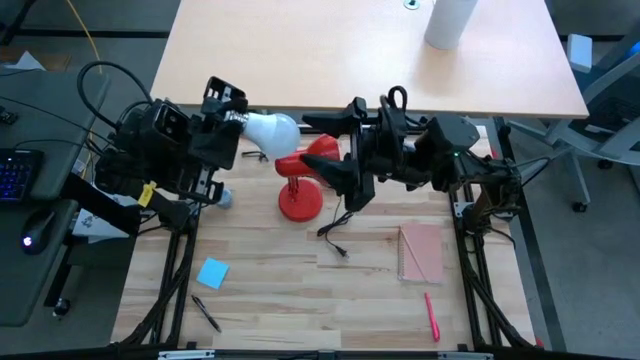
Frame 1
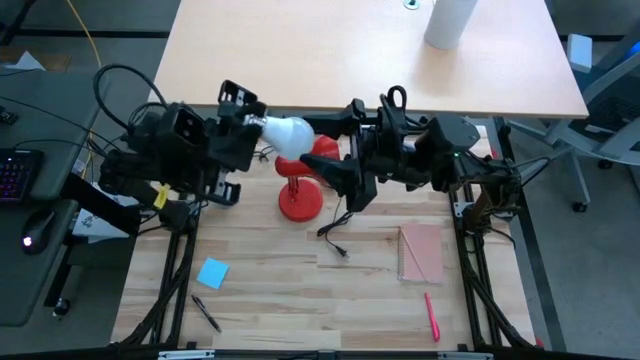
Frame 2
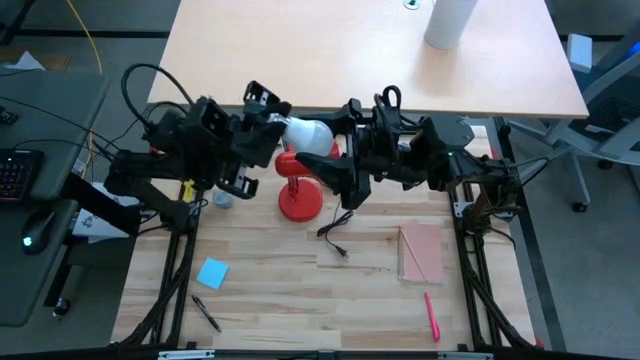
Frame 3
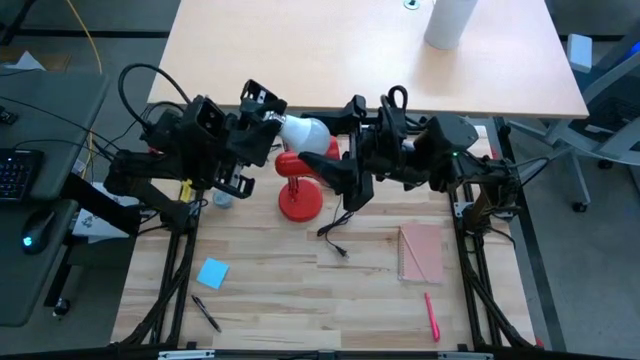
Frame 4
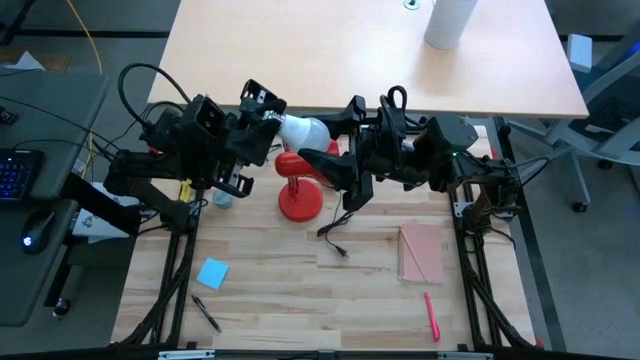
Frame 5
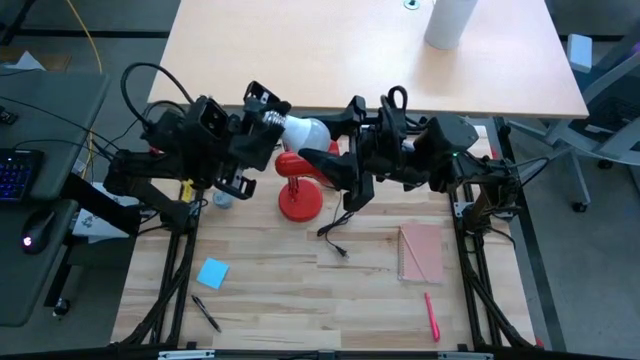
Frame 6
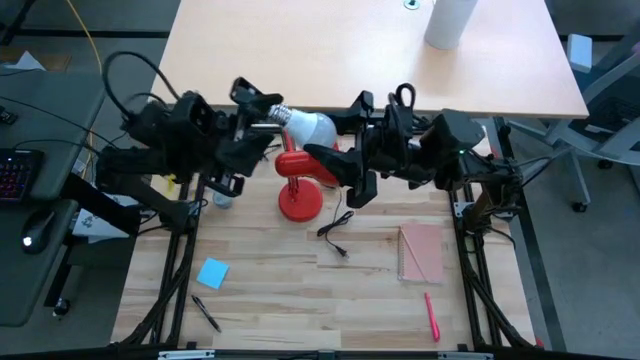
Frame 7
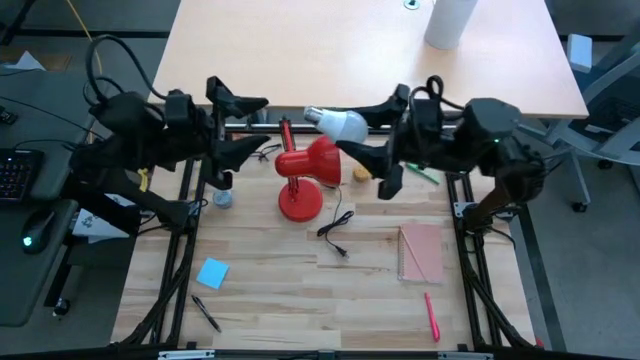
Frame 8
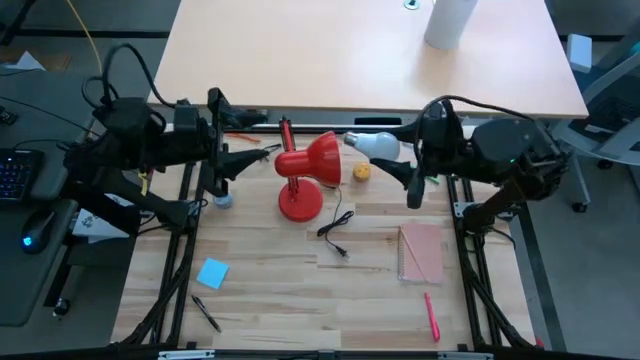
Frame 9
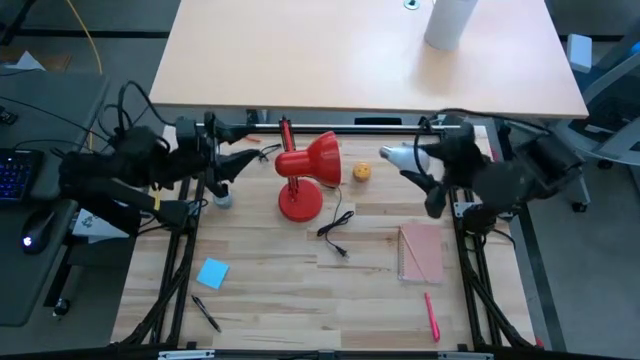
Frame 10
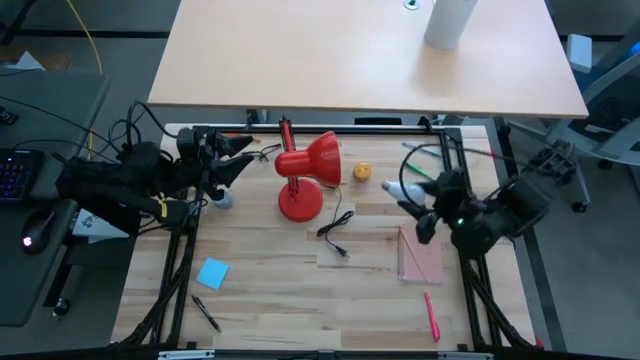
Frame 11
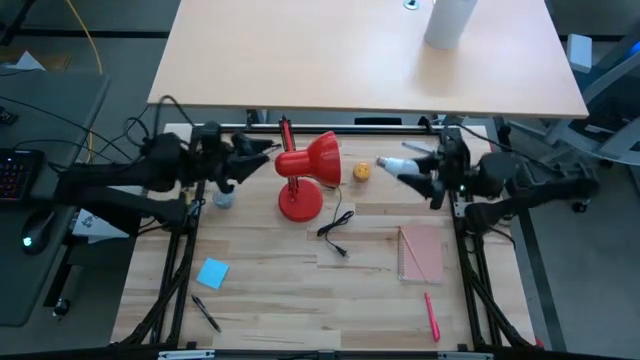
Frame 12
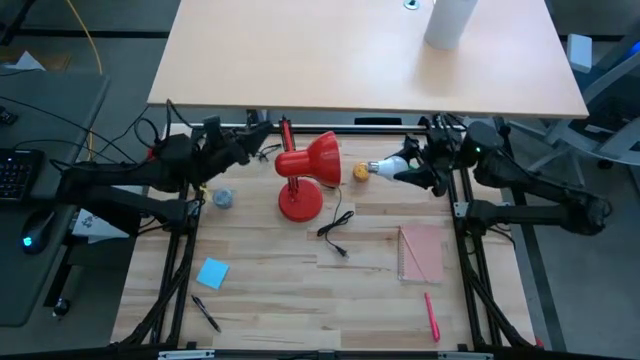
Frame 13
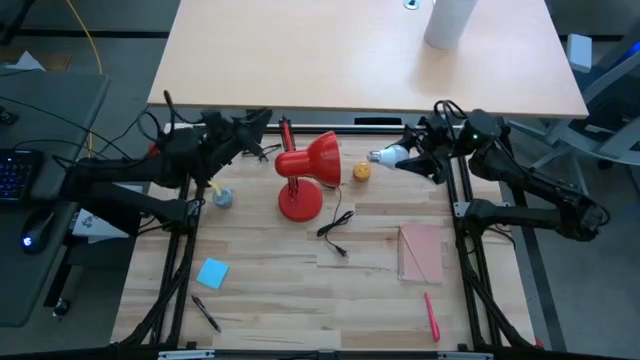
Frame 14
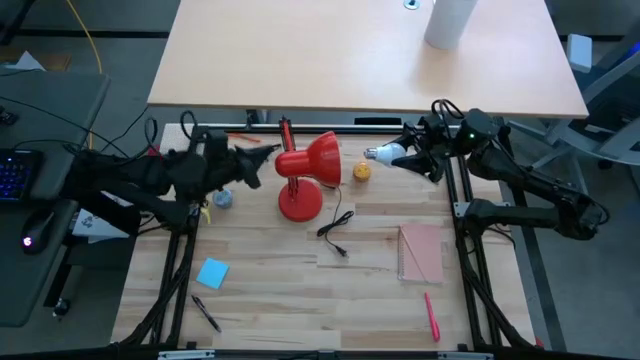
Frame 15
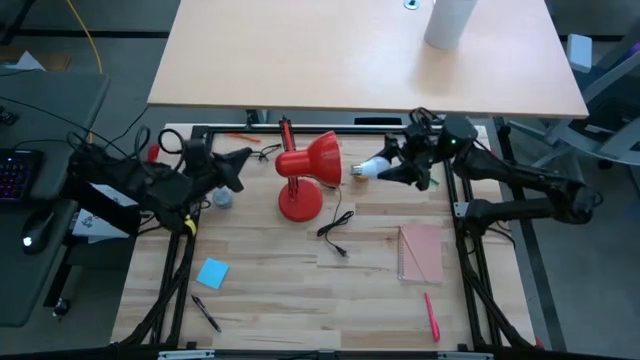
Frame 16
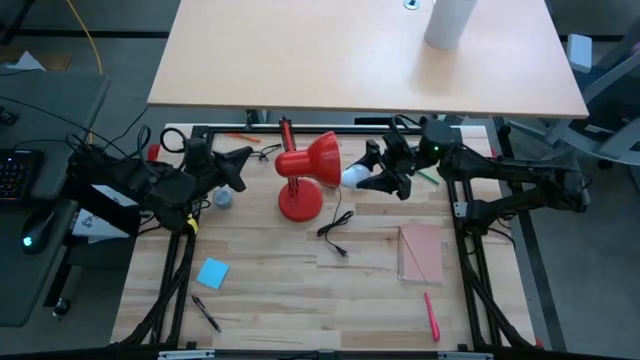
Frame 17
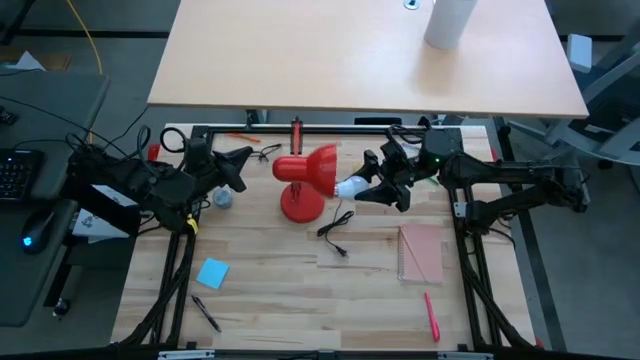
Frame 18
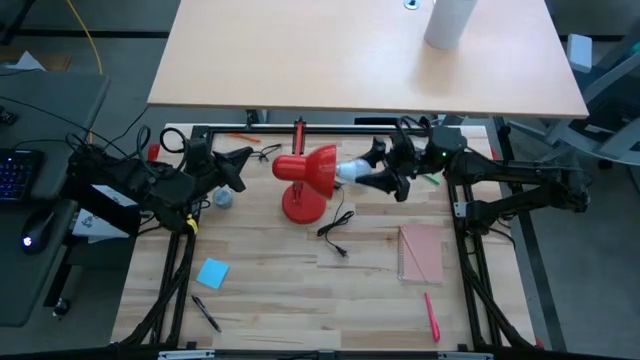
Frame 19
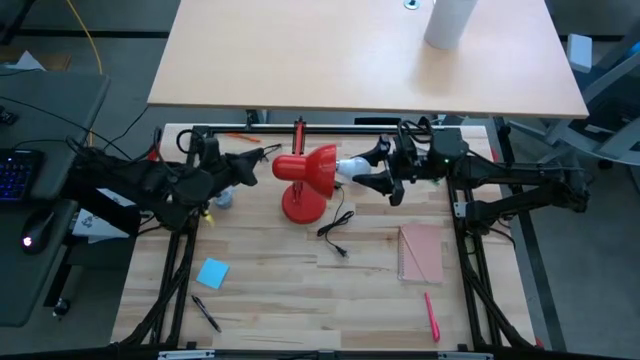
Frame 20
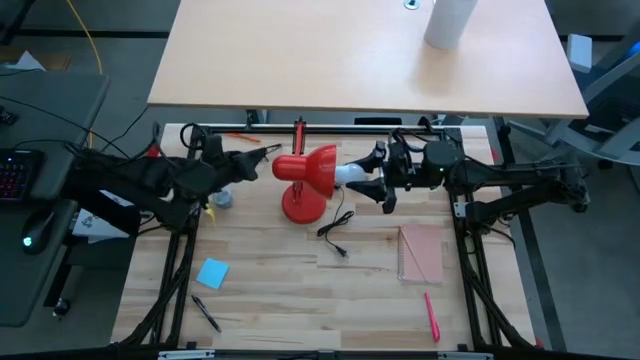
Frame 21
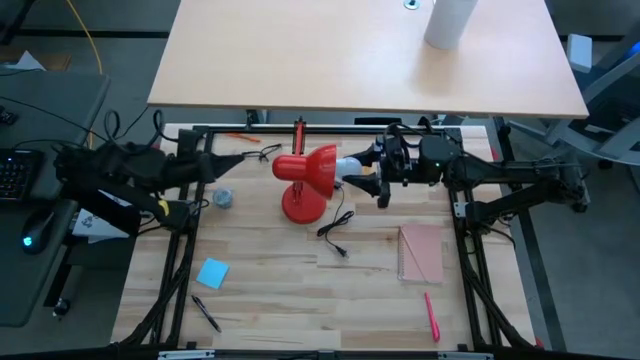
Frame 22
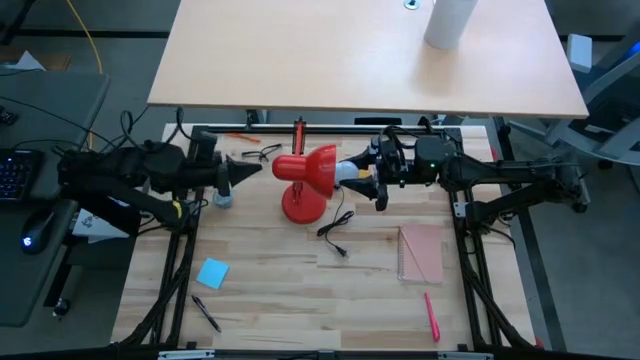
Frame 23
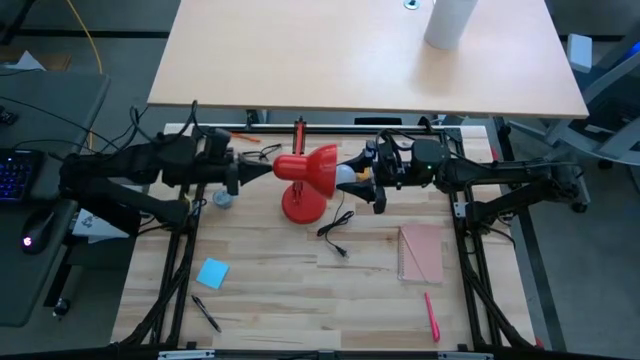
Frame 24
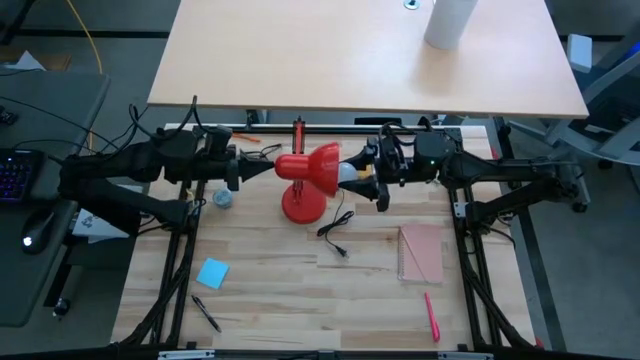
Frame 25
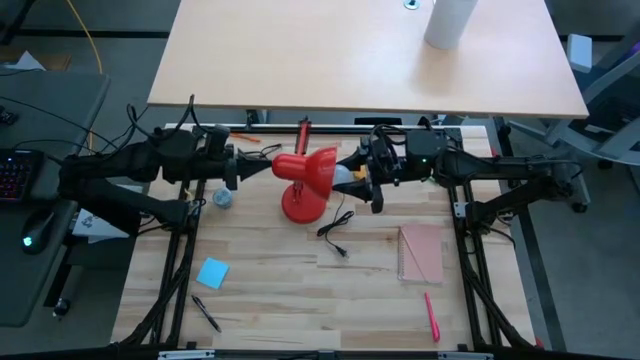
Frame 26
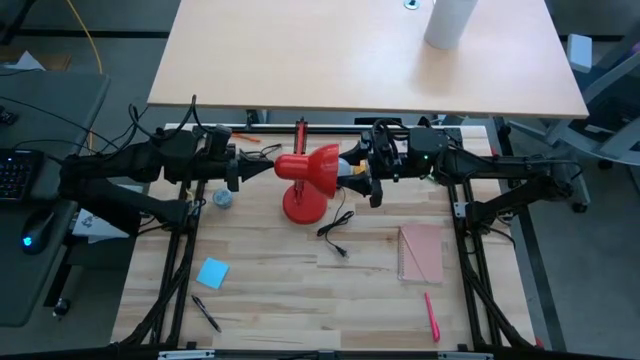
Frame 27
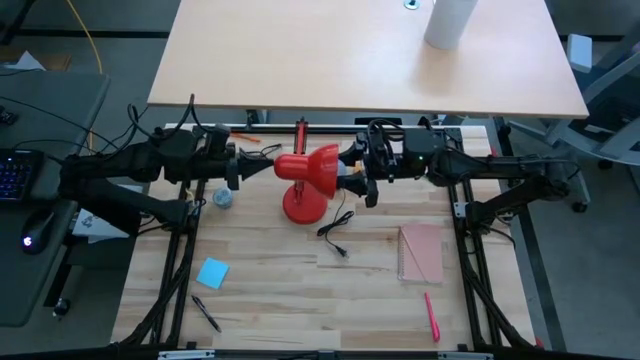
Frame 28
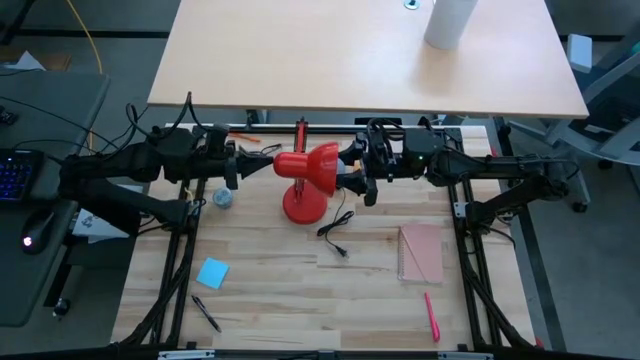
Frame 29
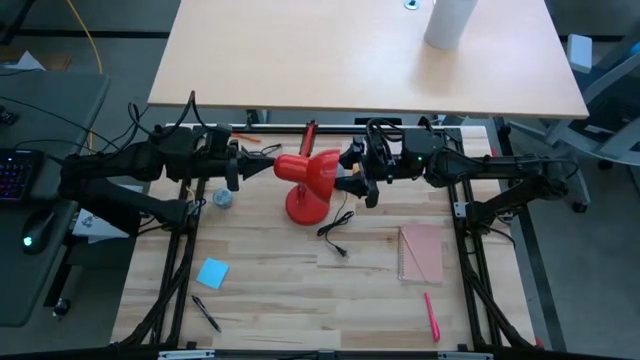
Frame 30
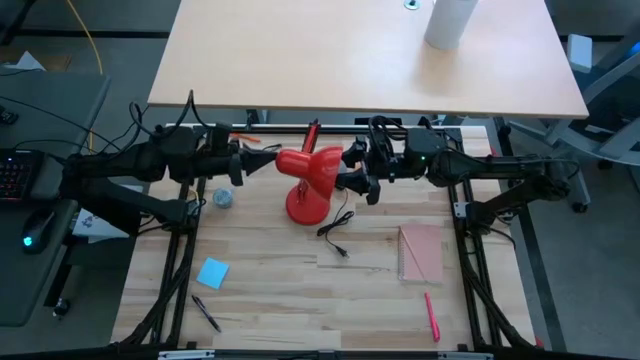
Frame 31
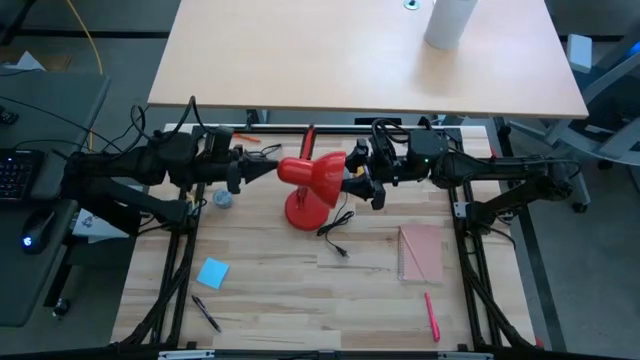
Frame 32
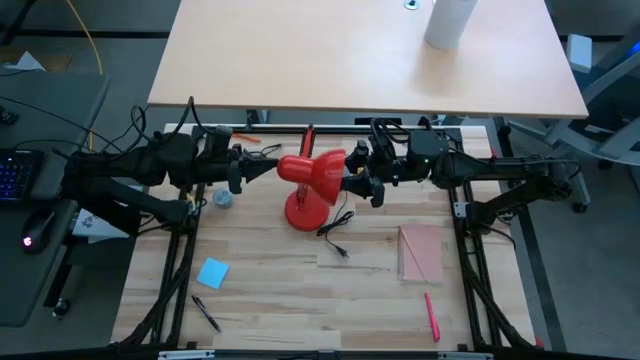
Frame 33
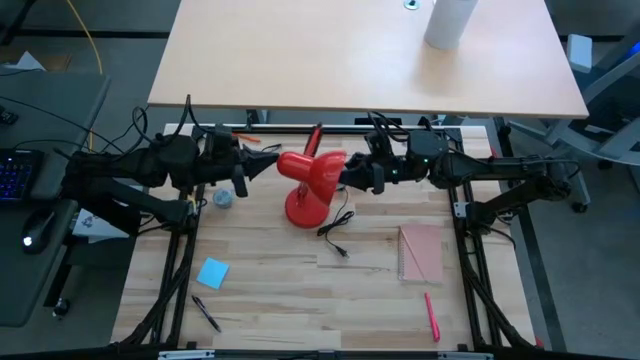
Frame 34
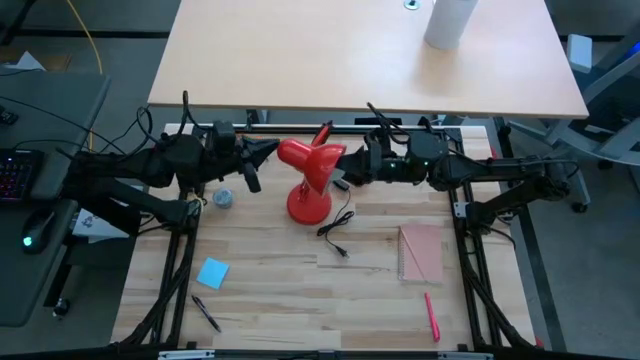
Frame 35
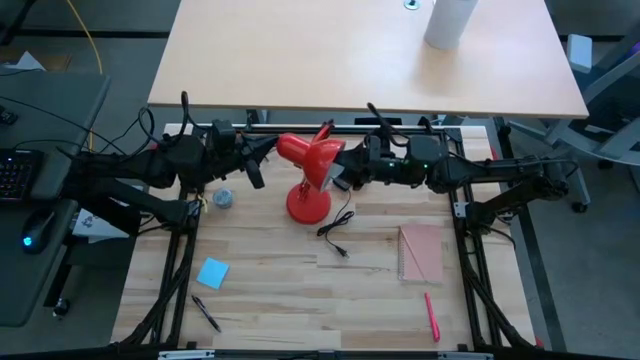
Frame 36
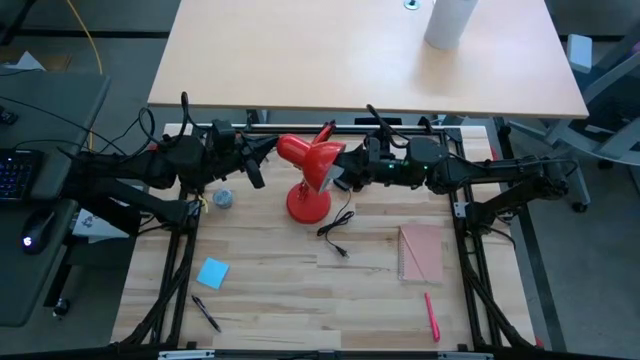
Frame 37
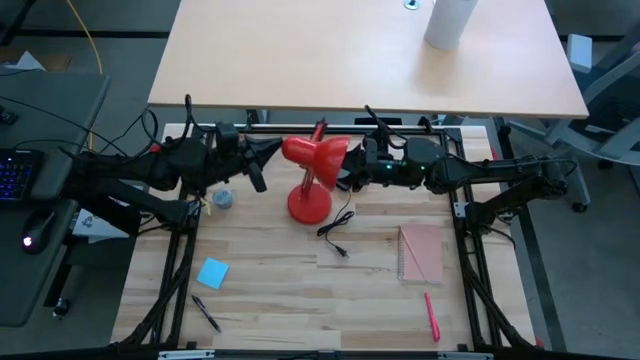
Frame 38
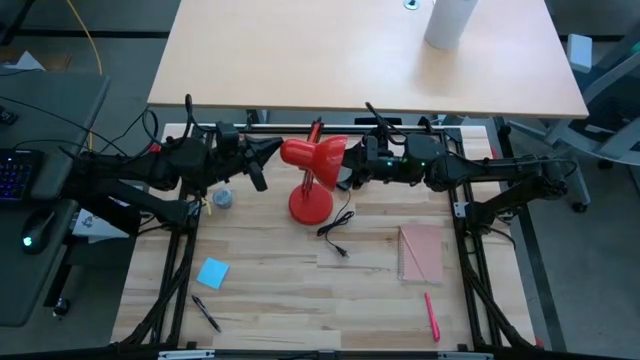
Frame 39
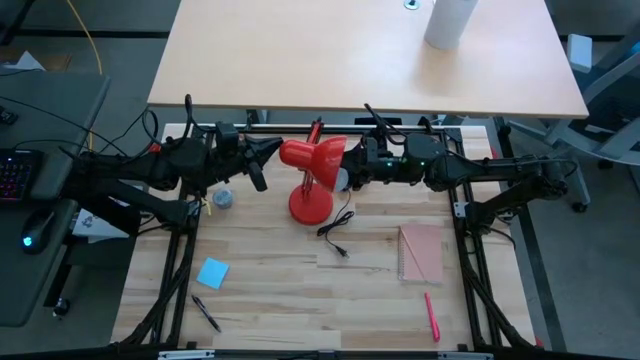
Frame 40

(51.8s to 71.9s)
Task: Screw lightbulb
Insert the lightbulb into the lamp

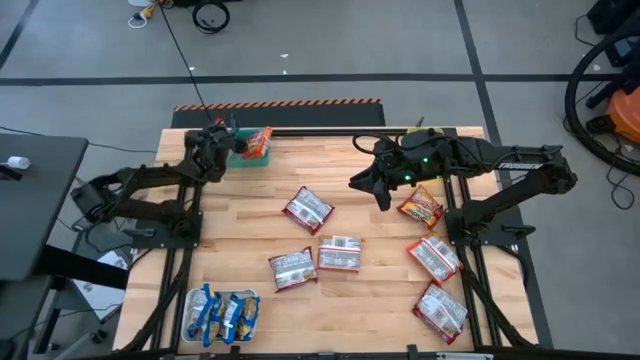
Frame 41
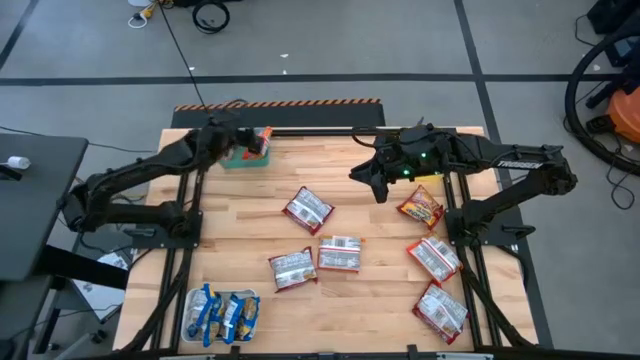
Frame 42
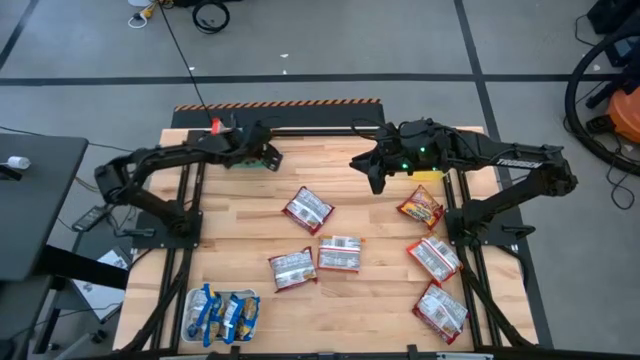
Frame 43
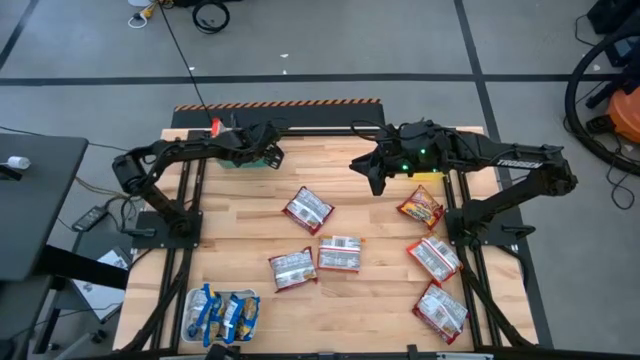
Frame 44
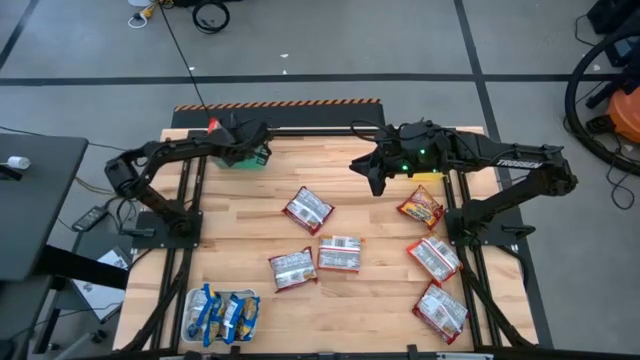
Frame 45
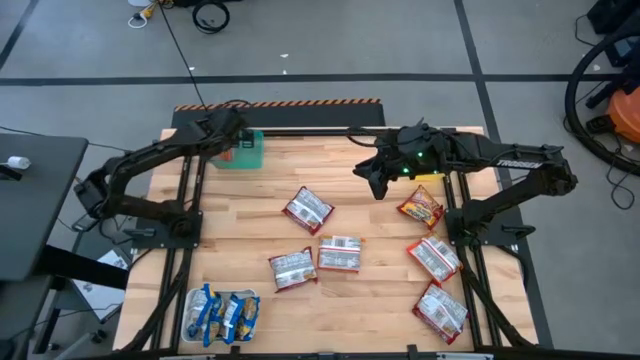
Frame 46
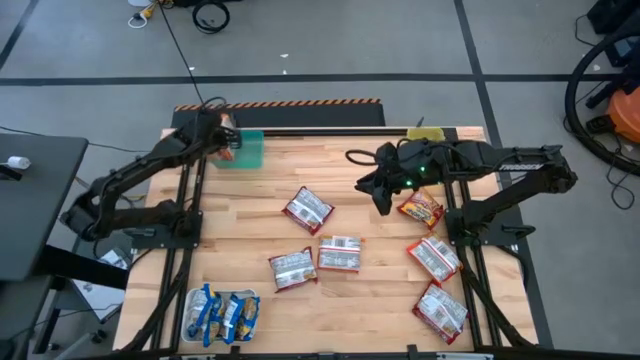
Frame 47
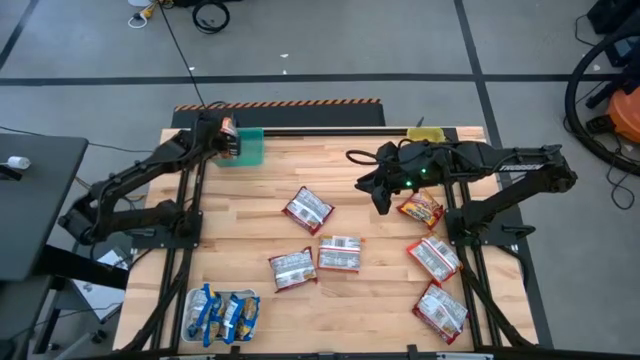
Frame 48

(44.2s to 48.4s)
Task: Sort Maruchan noodles
Adjust the orange noodle pack in the green bin
